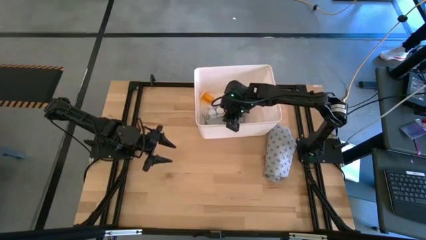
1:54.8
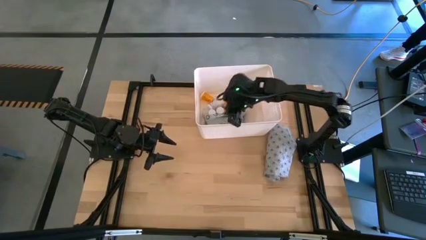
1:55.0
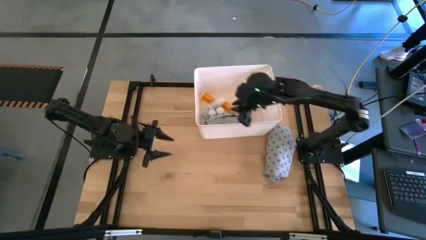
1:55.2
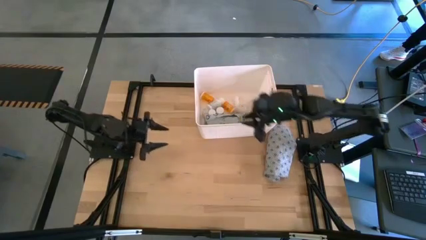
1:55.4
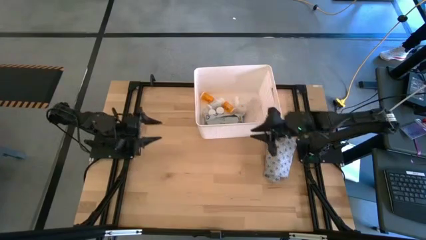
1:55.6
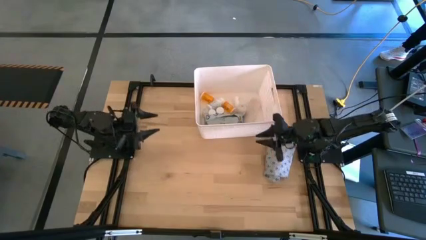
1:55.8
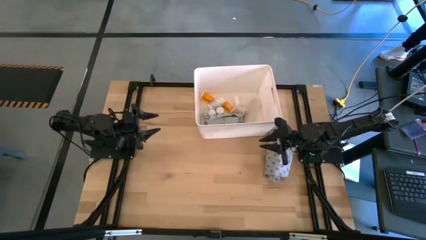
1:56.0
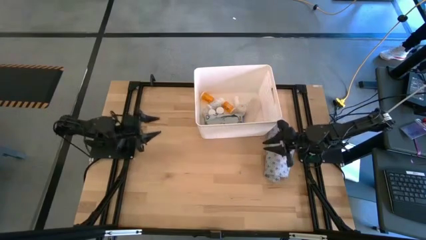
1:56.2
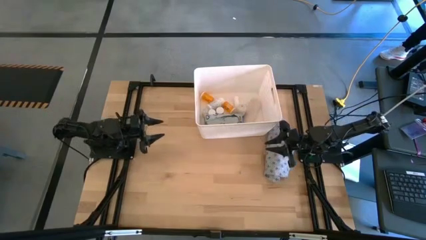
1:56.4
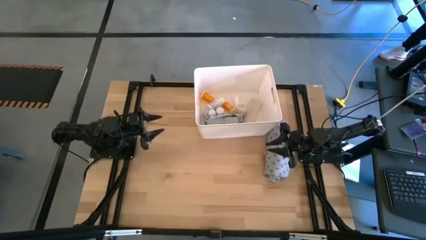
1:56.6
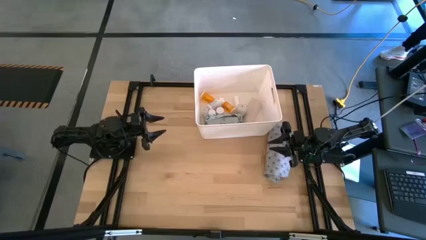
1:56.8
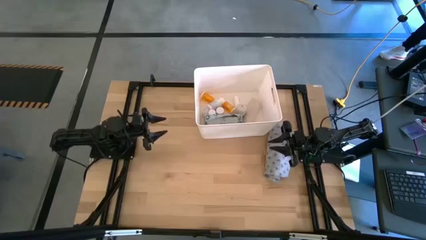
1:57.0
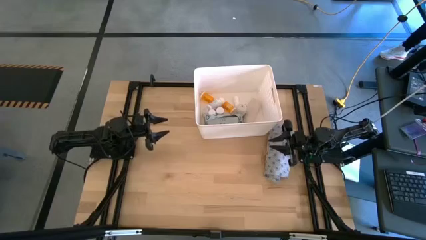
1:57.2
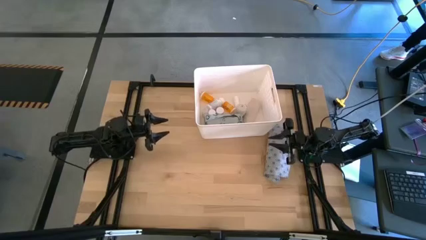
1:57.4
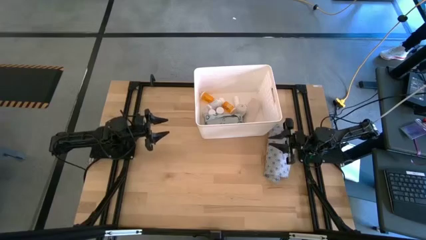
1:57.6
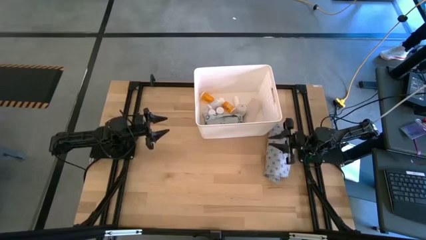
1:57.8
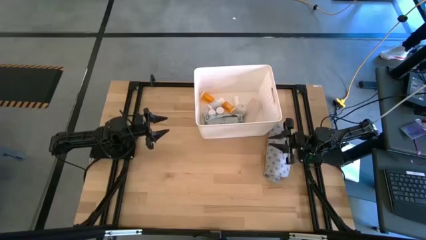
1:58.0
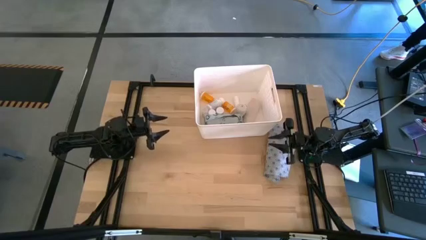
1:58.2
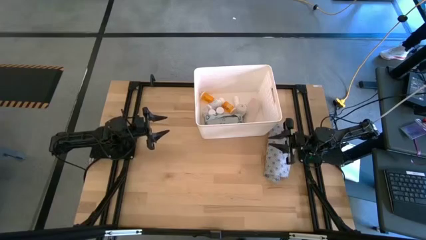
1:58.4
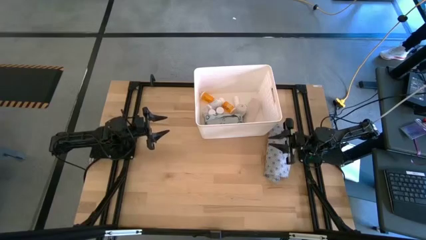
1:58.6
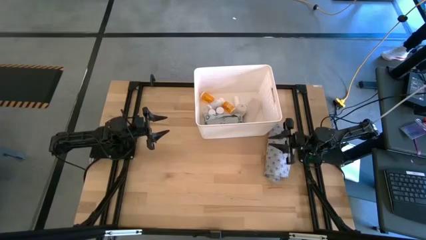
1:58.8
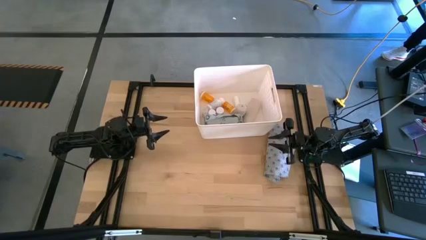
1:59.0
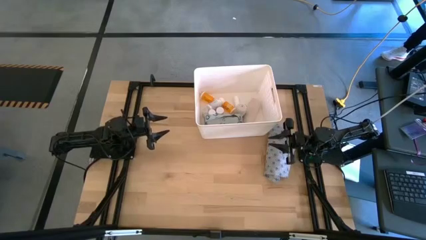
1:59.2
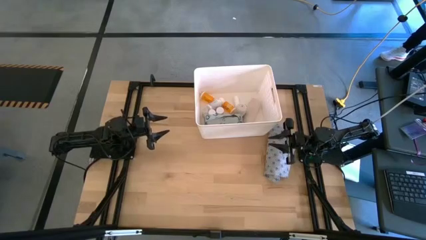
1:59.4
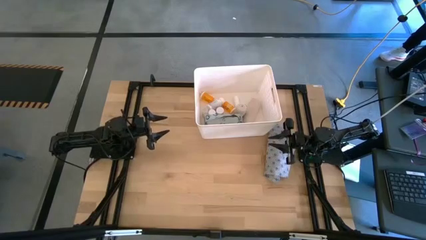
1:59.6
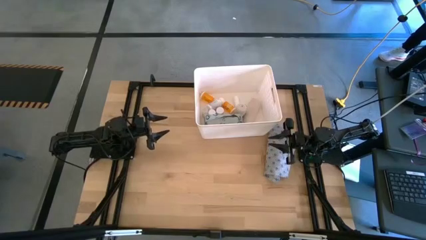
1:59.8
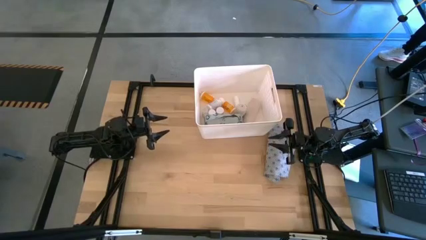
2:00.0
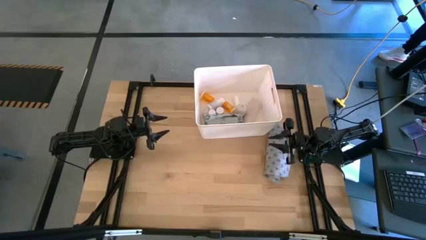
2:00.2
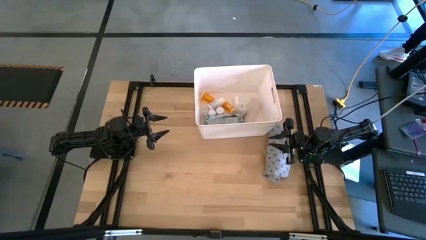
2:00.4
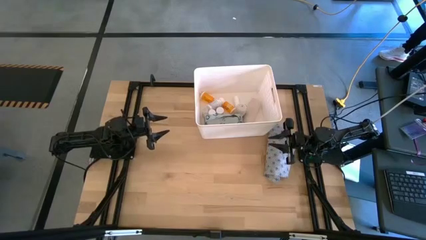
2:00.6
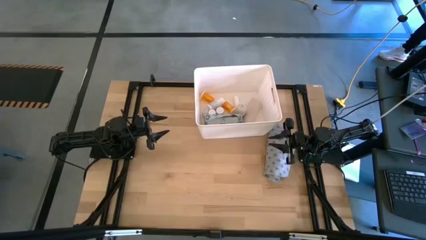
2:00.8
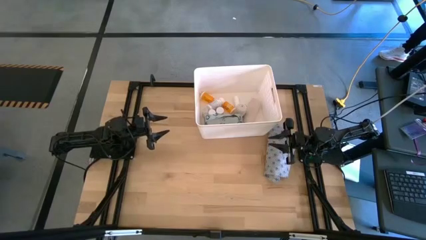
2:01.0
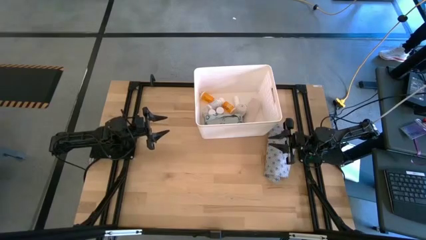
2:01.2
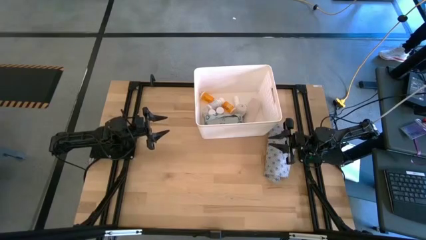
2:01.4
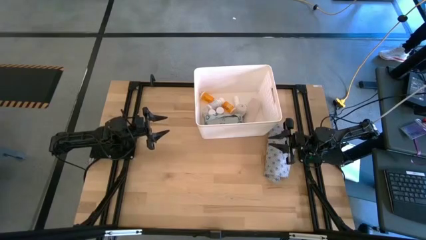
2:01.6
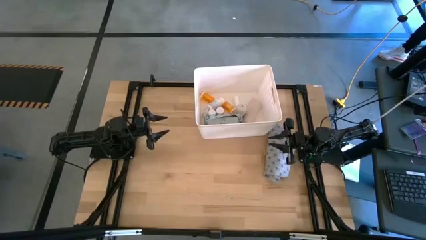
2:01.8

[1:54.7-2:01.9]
Task: Pick & place medical supplies in basket/bin
Return to Home Position

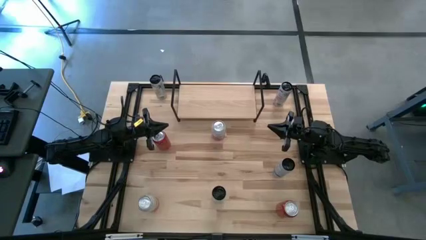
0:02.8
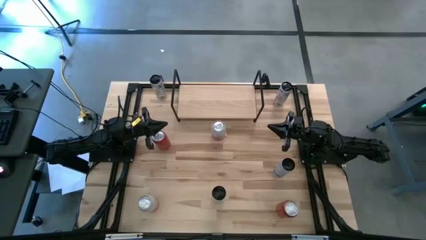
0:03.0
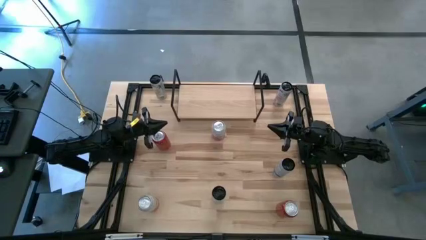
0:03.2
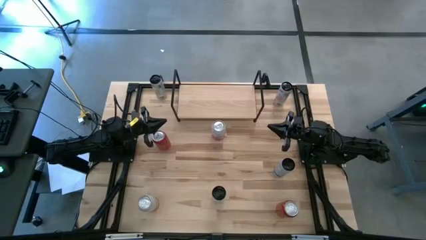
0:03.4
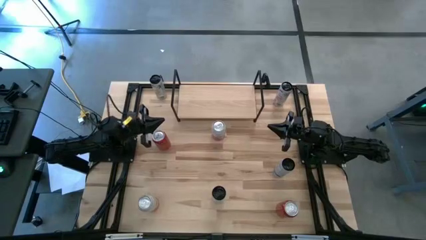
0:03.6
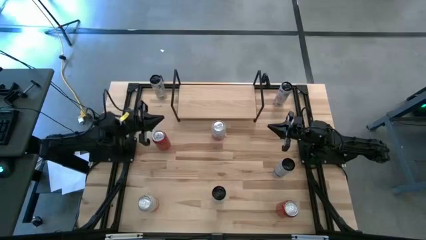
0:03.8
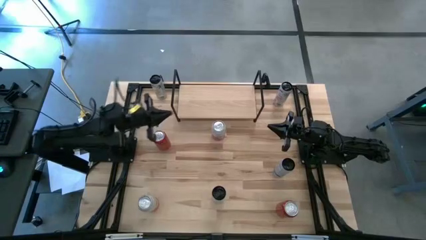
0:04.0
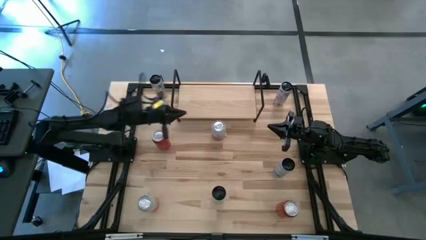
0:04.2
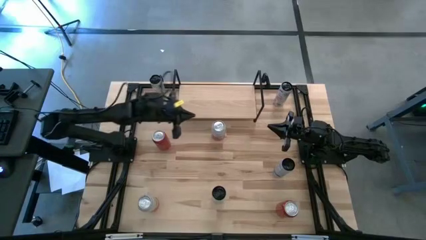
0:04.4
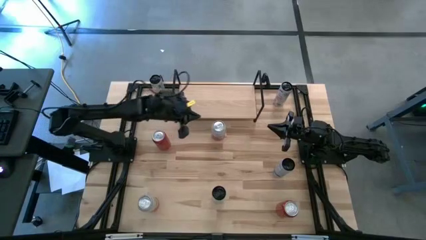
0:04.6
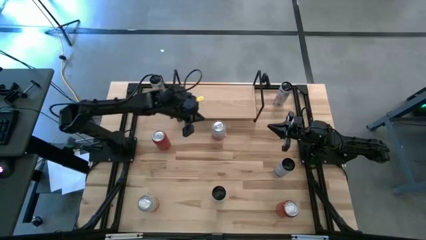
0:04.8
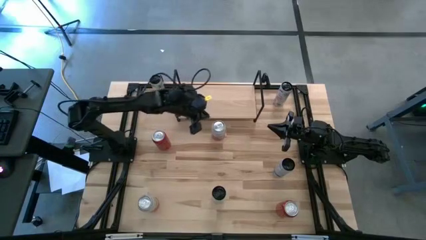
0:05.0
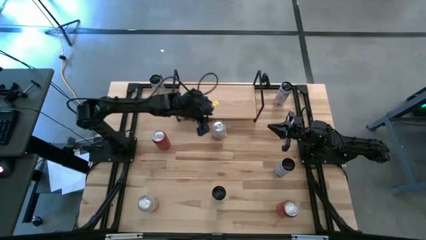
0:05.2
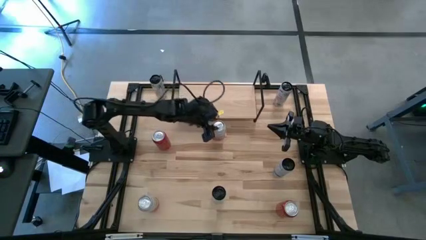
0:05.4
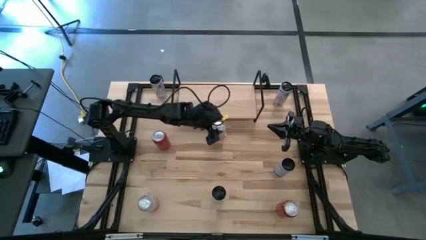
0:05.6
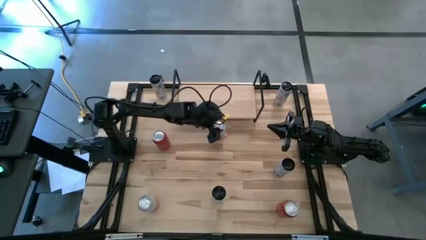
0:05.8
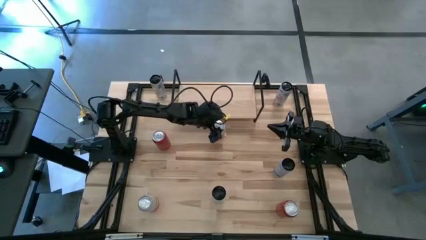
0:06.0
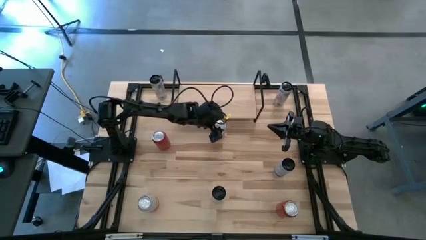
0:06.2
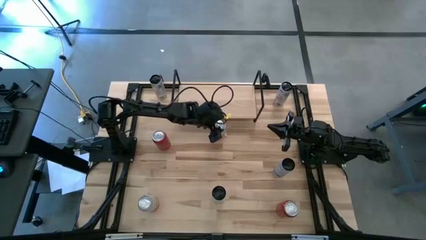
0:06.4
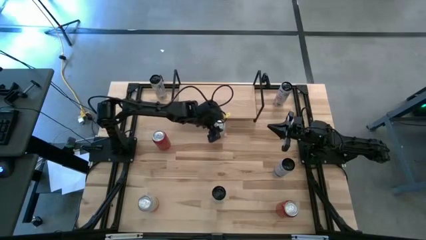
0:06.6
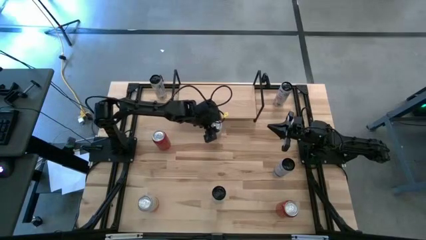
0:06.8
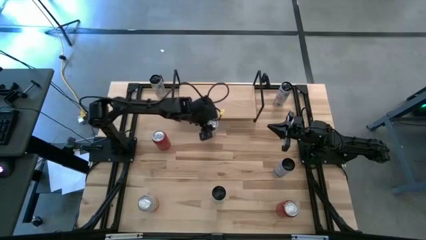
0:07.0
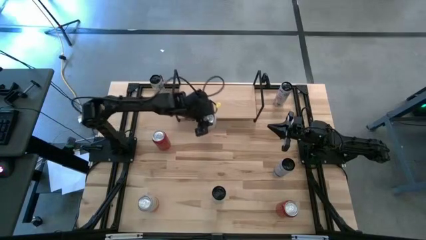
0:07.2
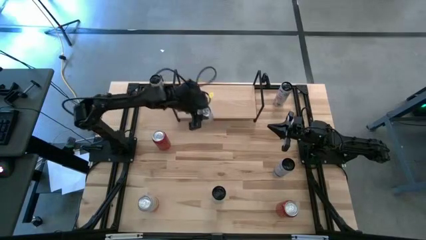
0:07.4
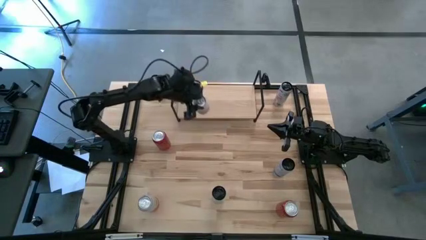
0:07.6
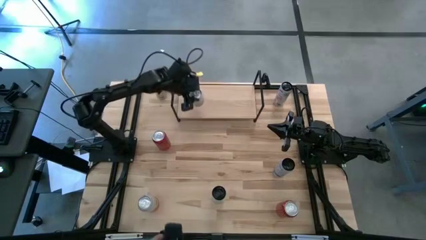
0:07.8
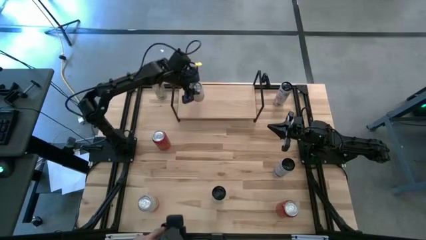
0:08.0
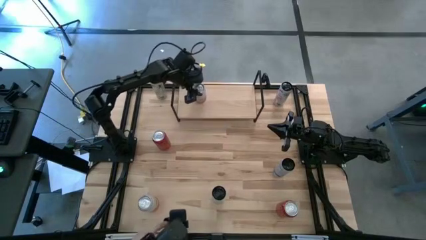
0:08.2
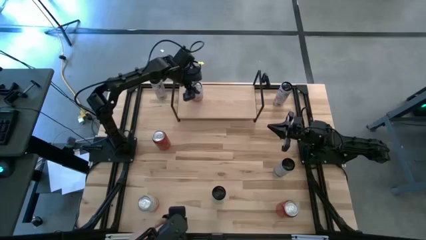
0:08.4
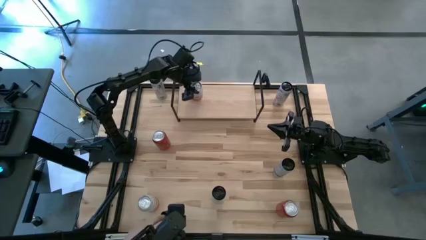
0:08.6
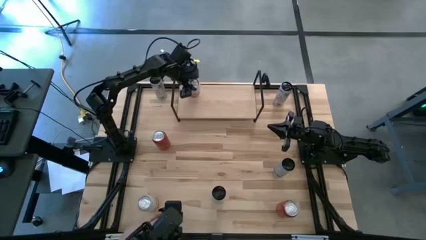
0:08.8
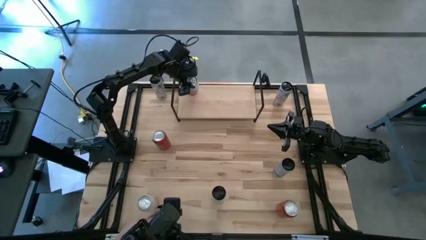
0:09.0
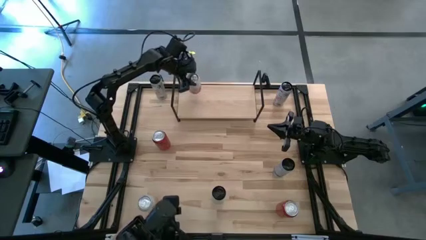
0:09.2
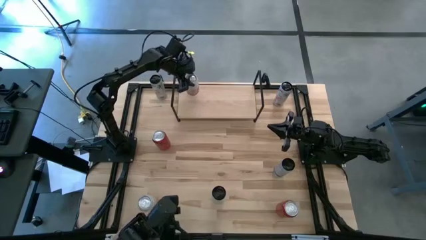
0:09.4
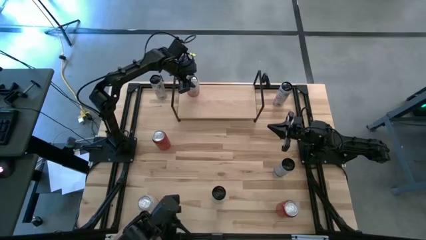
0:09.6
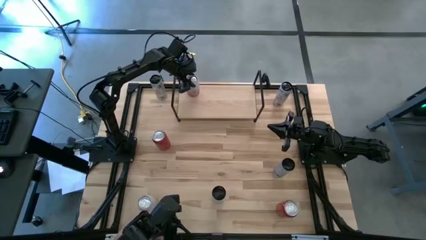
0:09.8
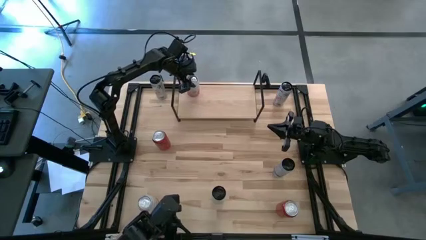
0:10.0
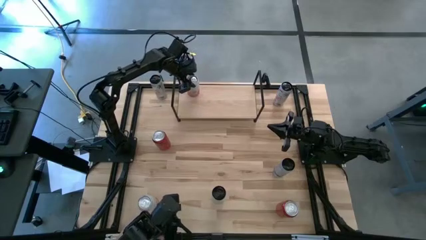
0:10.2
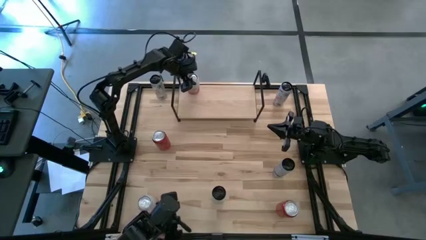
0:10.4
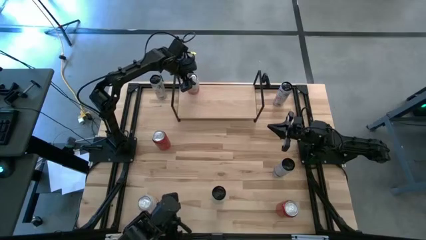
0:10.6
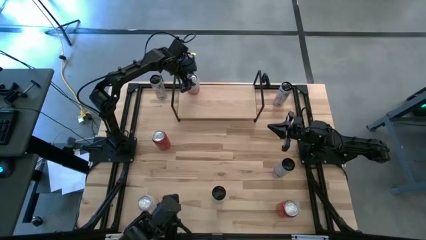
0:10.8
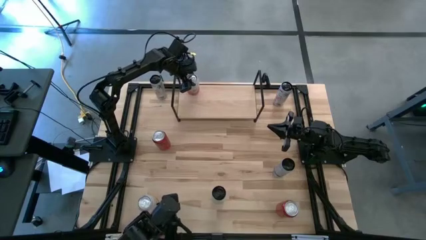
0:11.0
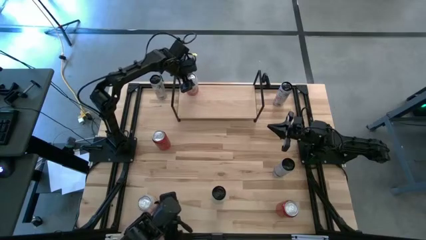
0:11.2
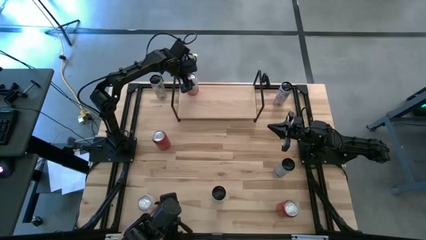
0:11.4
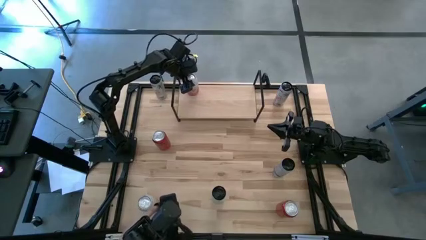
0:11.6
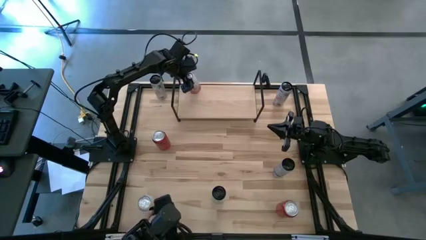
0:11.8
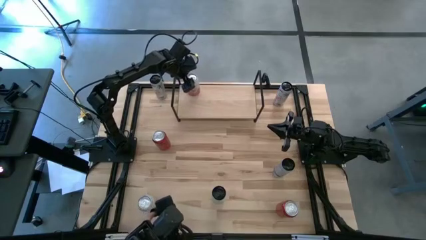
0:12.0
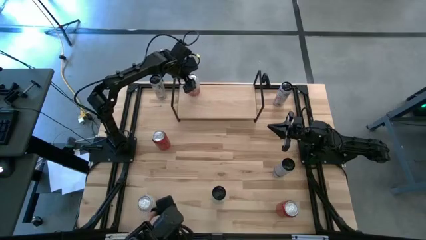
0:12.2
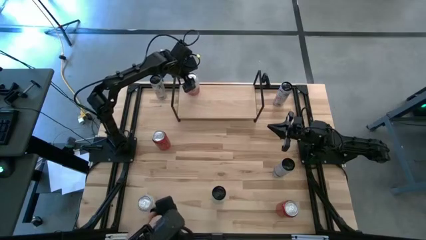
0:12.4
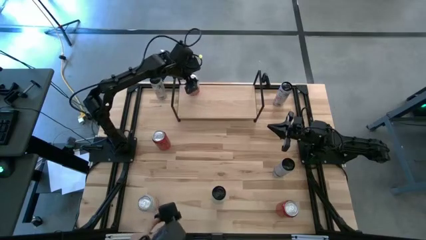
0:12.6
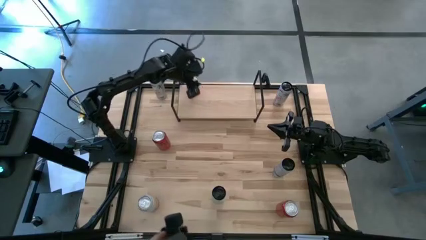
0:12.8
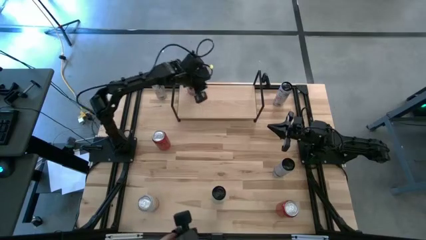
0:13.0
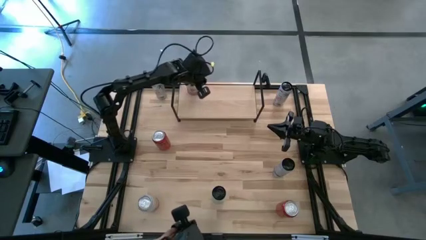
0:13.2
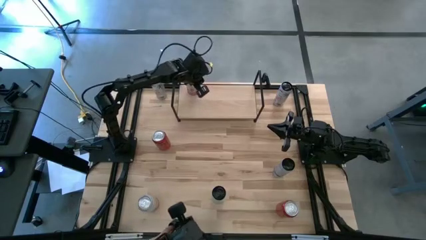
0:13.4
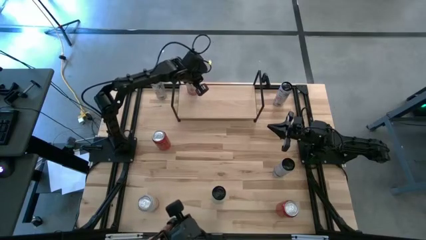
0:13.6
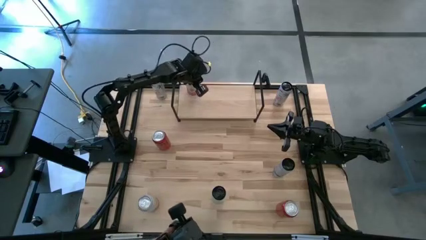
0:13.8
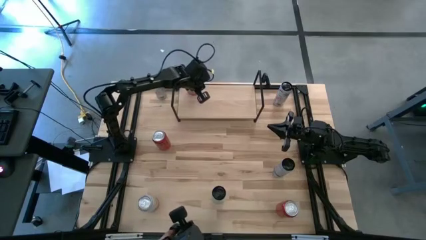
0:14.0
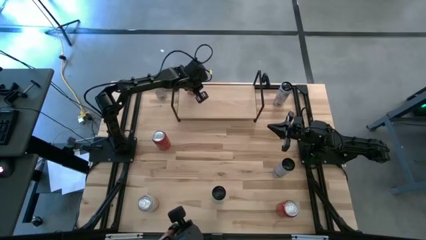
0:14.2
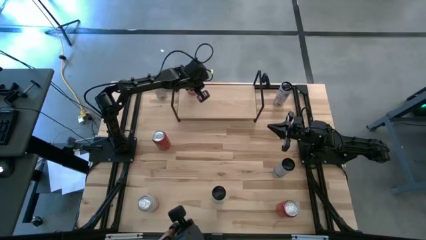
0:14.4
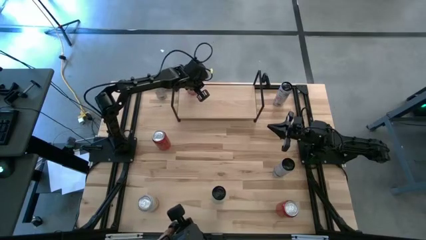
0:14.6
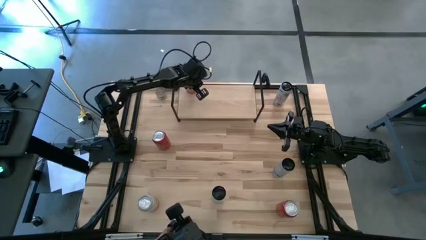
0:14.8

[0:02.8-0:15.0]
Task: Place canned beverage on shelf
Put the top pink white soda can on the shelf
